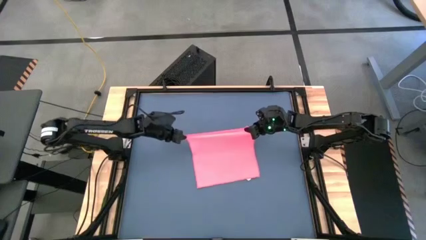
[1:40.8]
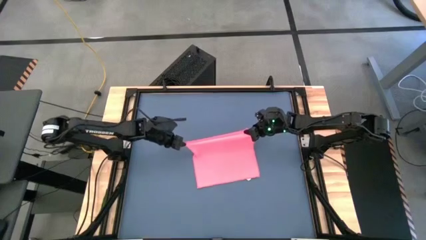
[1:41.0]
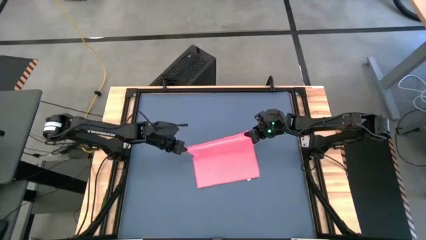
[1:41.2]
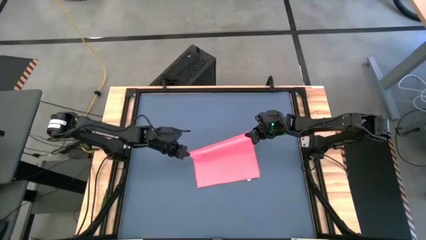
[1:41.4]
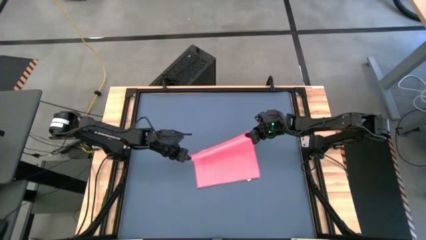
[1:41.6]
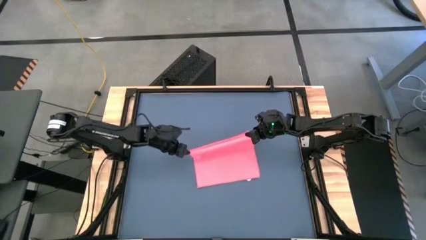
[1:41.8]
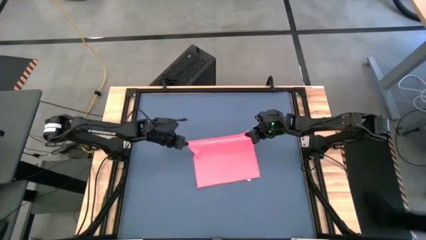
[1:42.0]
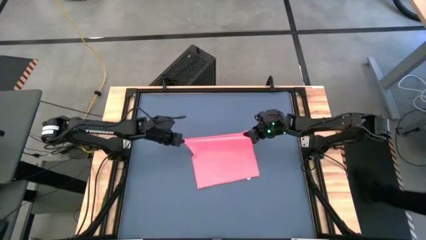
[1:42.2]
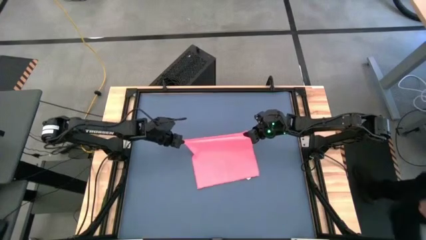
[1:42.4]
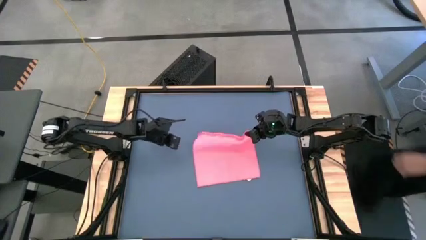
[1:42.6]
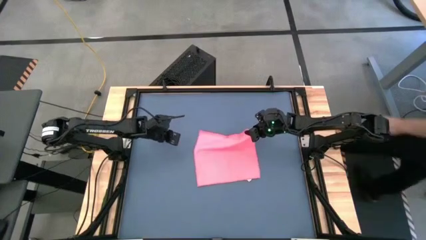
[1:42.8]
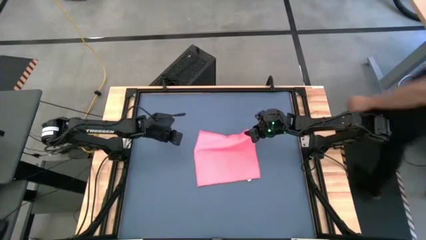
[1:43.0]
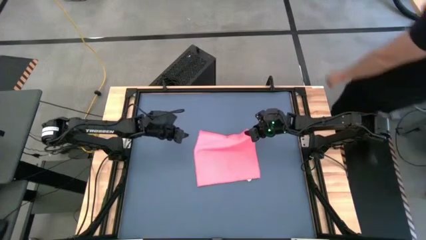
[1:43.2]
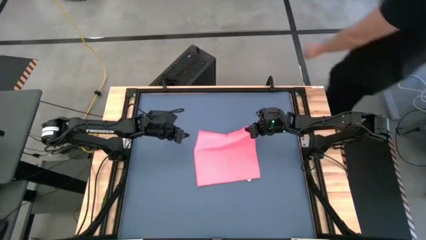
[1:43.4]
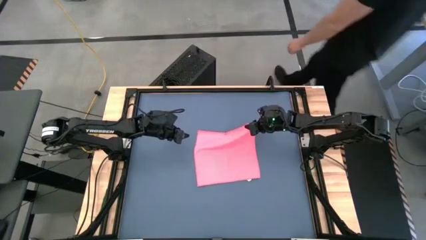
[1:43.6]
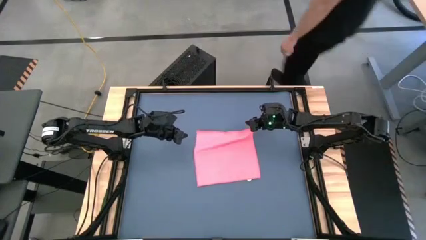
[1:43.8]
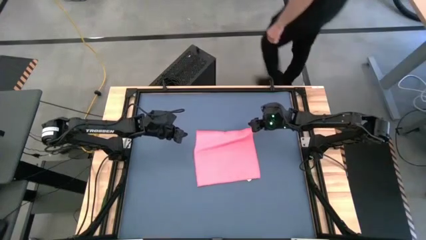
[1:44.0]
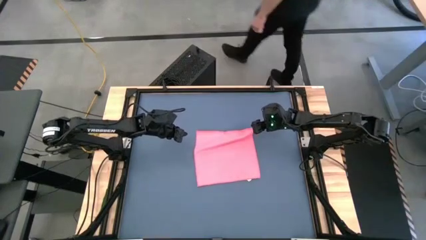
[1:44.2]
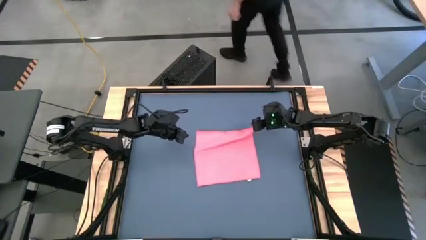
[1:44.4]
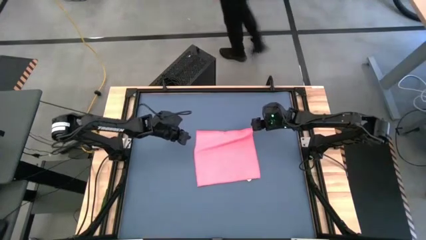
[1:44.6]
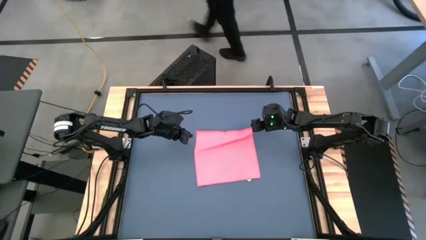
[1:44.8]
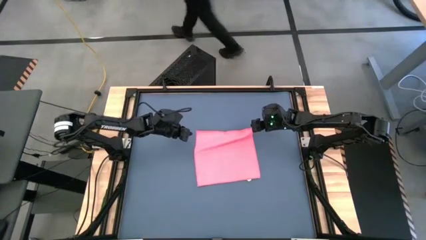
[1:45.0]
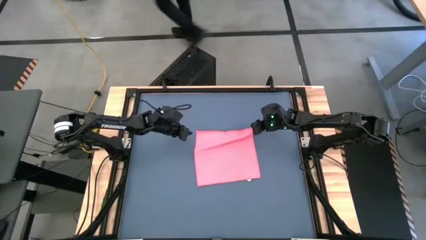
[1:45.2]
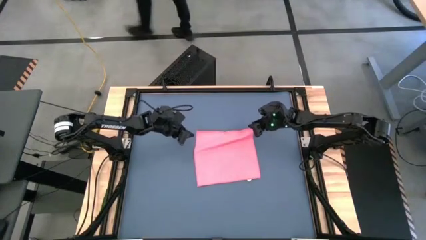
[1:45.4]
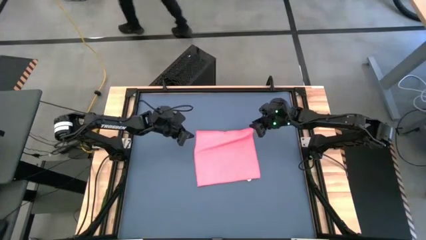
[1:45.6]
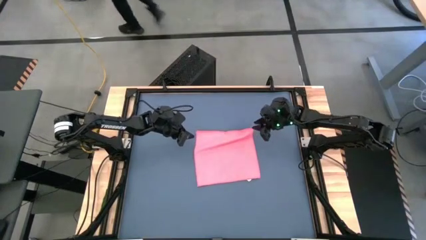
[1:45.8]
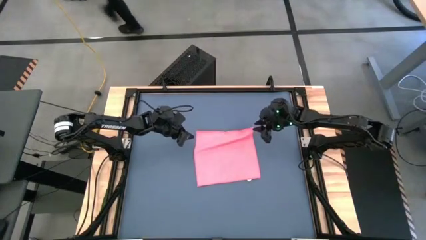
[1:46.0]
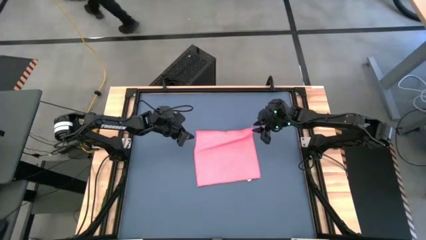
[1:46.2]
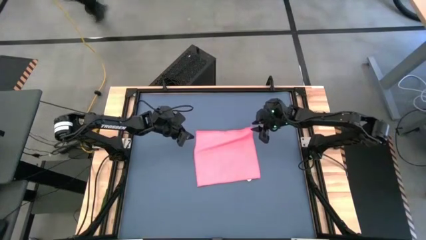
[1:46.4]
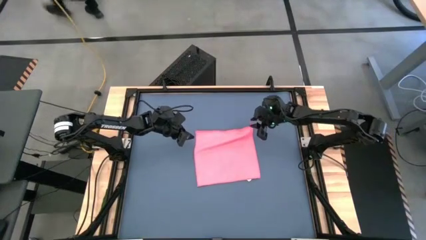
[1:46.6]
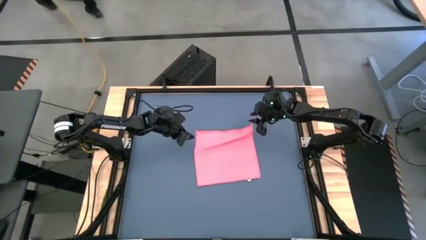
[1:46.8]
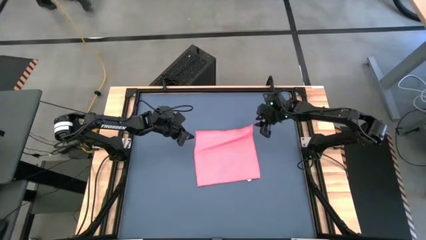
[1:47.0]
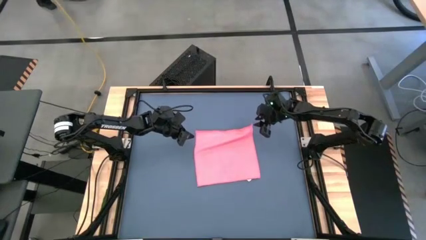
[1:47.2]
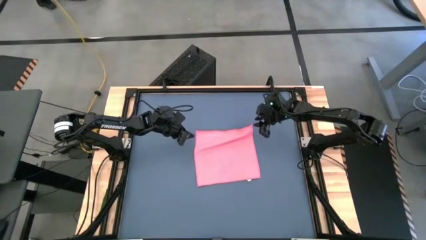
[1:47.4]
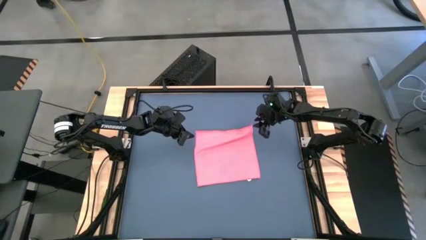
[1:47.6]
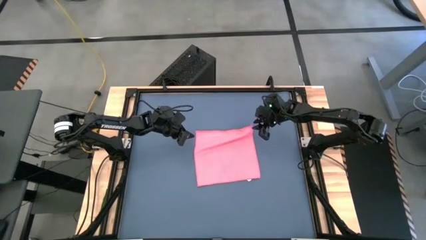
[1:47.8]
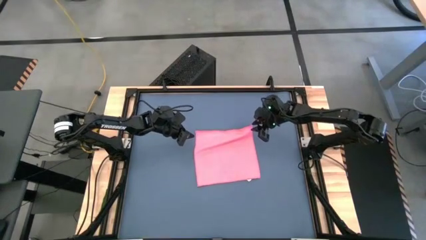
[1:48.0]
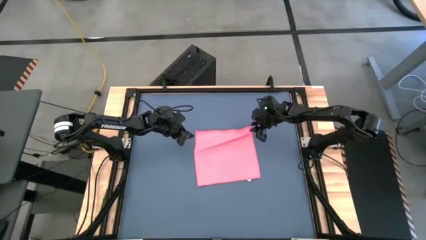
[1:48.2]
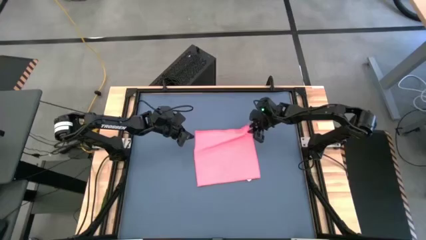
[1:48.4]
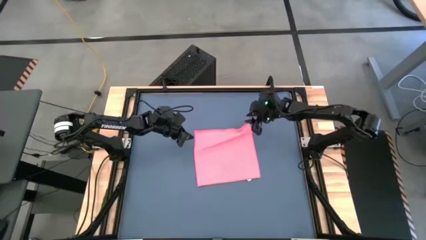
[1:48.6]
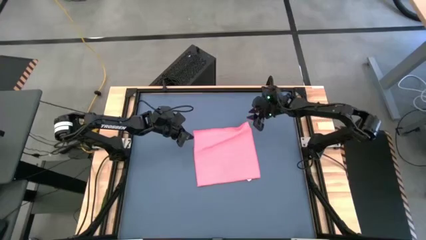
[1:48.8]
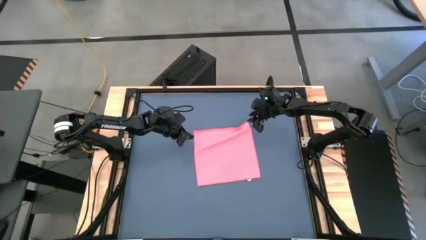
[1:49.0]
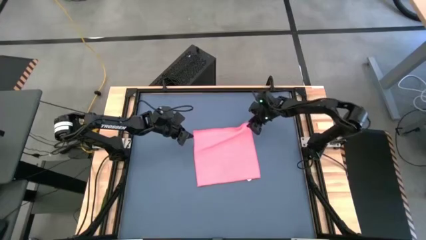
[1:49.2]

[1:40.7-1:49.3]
Task: Roll towel
Fold the pink towel

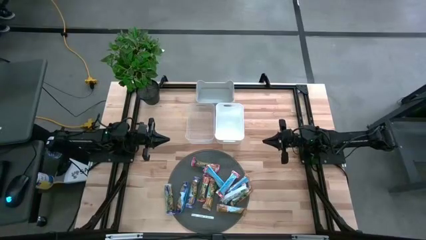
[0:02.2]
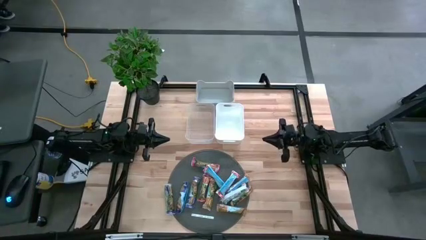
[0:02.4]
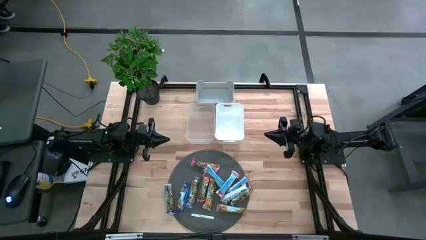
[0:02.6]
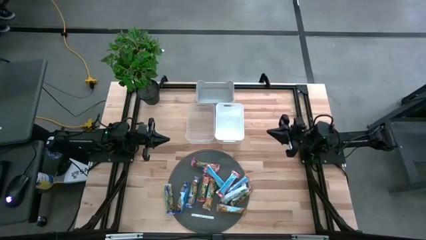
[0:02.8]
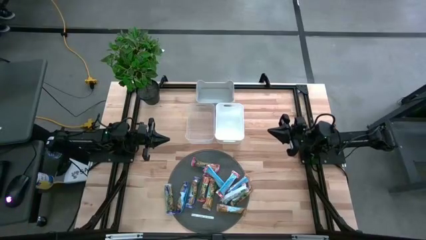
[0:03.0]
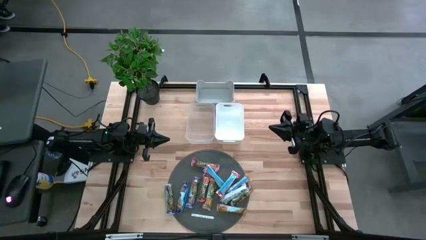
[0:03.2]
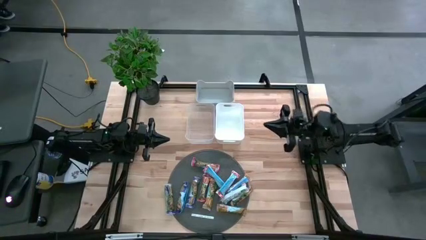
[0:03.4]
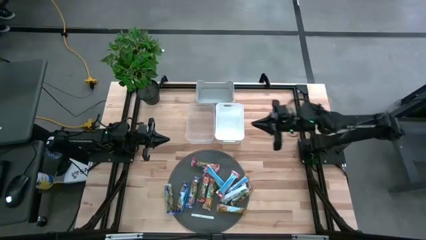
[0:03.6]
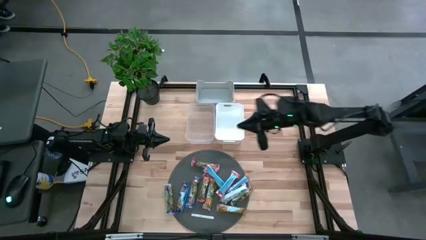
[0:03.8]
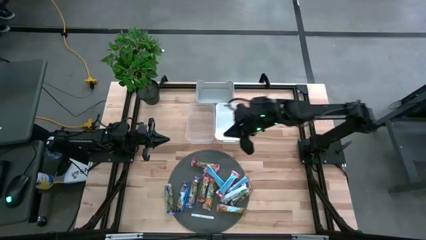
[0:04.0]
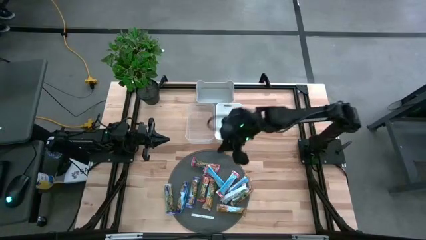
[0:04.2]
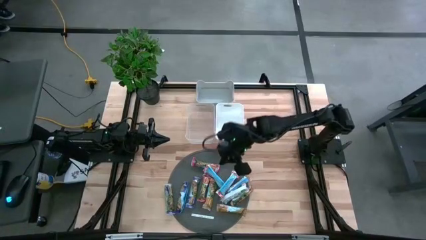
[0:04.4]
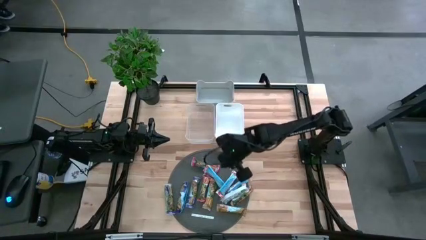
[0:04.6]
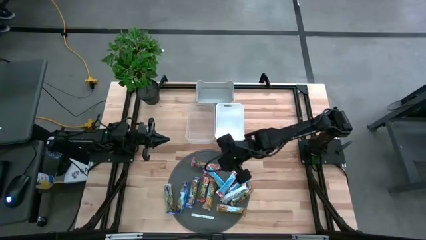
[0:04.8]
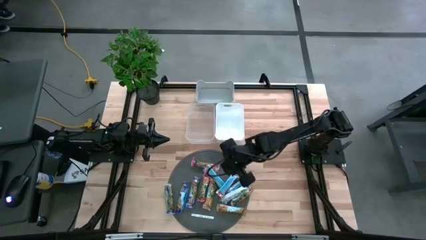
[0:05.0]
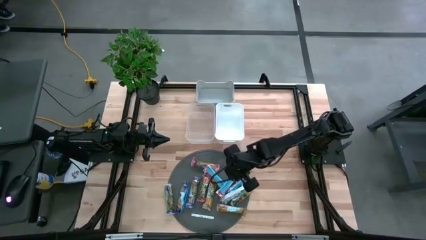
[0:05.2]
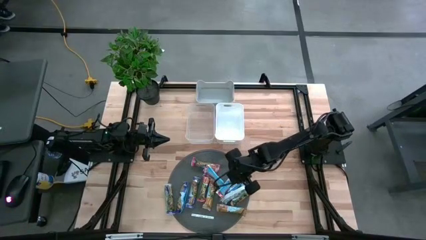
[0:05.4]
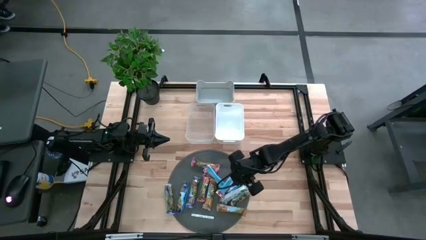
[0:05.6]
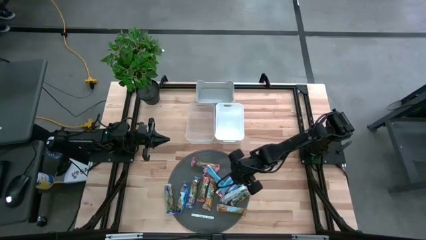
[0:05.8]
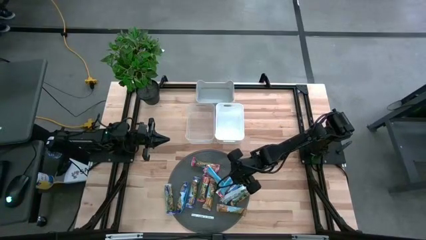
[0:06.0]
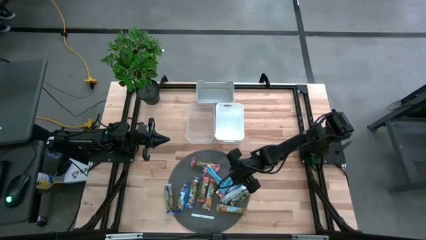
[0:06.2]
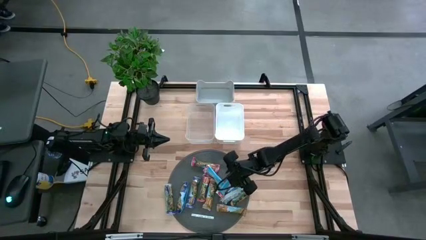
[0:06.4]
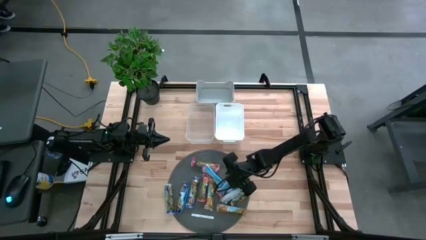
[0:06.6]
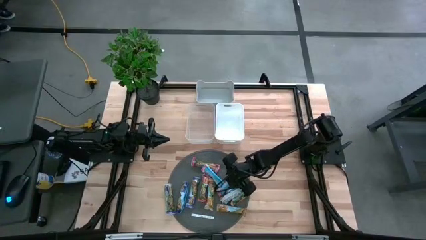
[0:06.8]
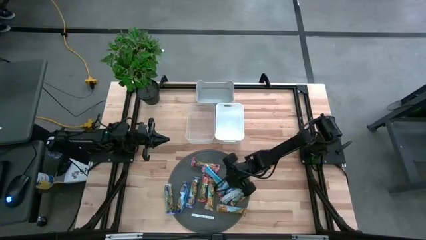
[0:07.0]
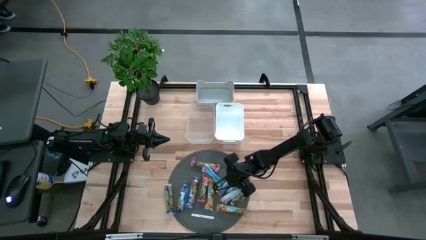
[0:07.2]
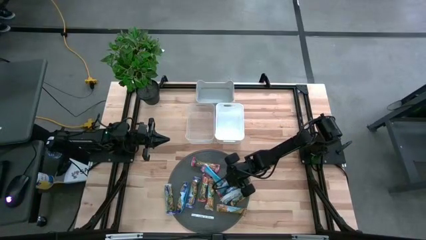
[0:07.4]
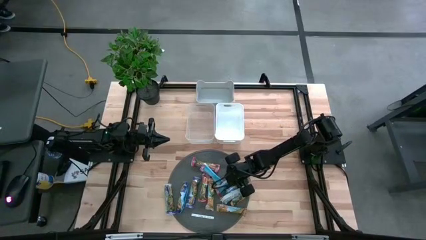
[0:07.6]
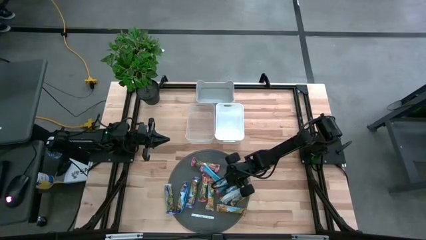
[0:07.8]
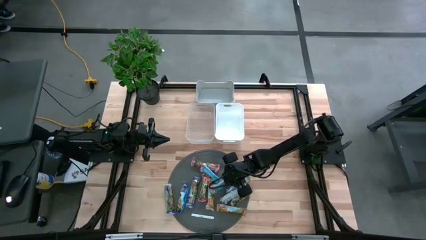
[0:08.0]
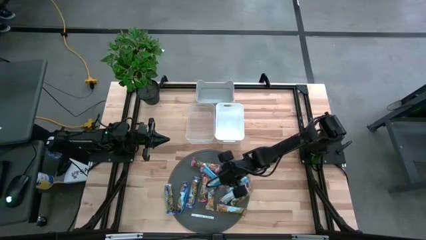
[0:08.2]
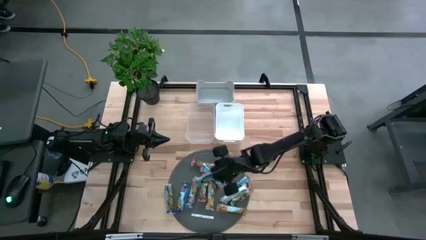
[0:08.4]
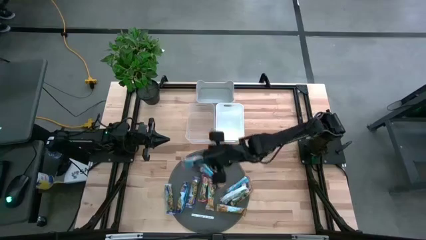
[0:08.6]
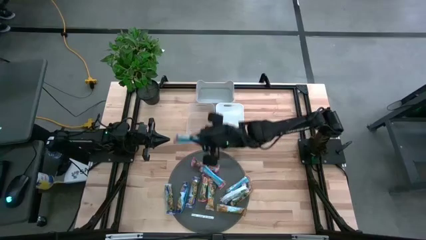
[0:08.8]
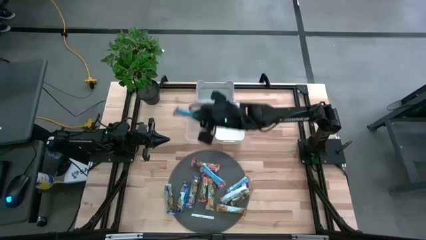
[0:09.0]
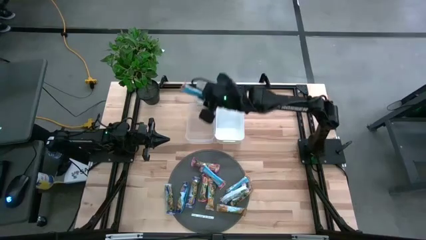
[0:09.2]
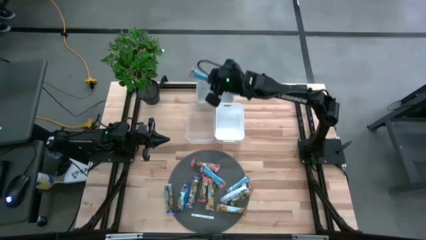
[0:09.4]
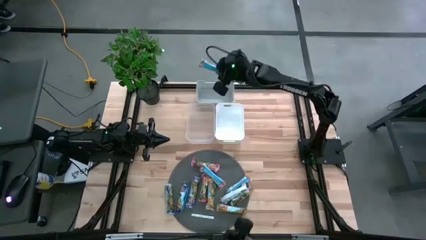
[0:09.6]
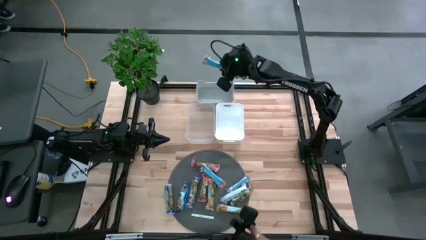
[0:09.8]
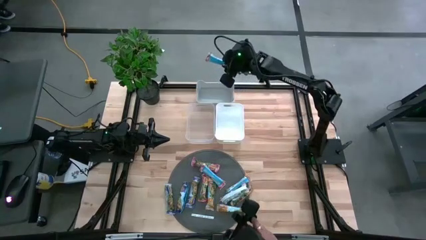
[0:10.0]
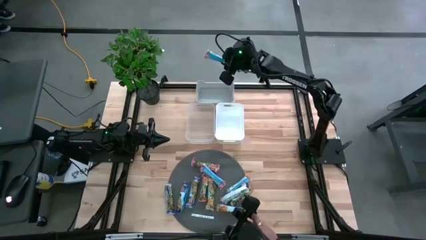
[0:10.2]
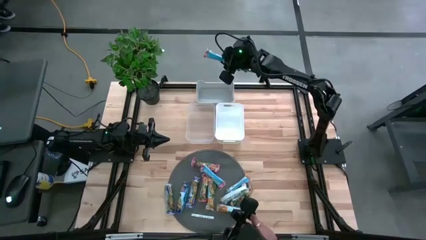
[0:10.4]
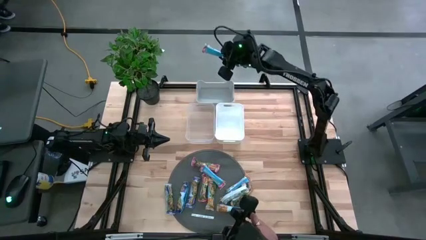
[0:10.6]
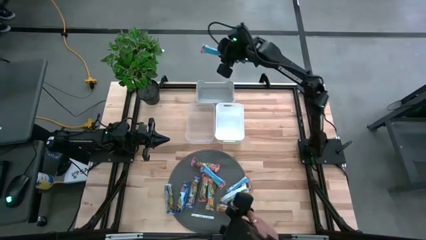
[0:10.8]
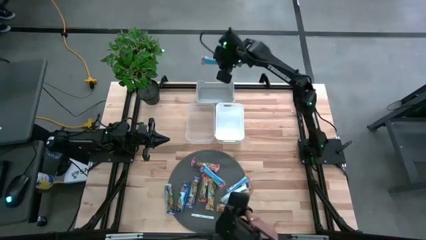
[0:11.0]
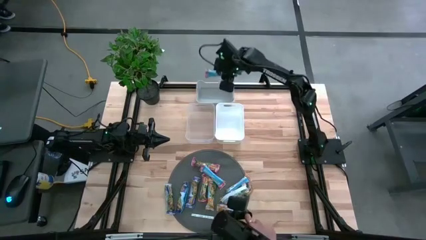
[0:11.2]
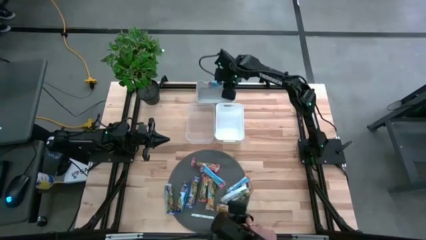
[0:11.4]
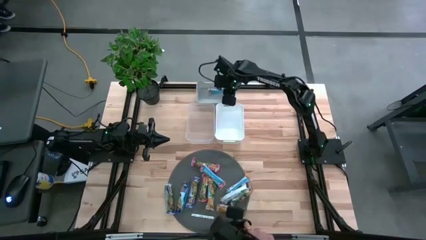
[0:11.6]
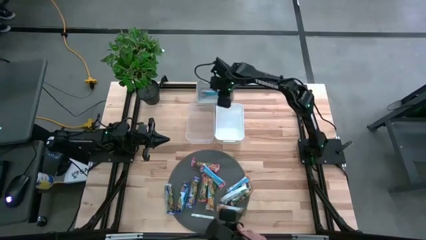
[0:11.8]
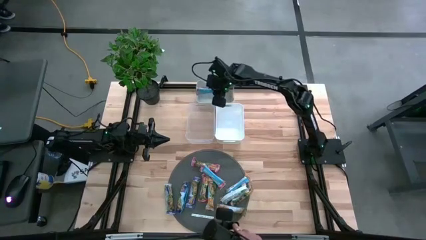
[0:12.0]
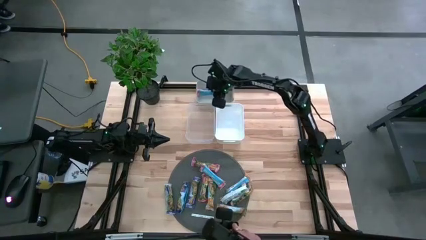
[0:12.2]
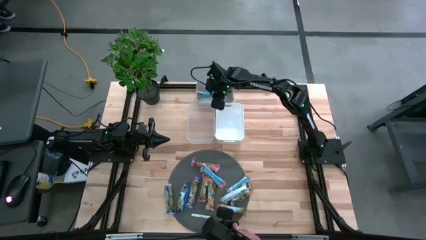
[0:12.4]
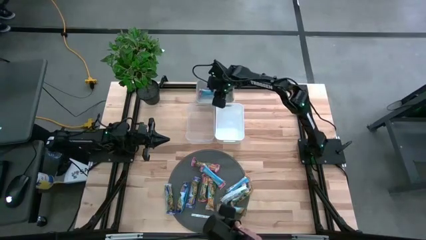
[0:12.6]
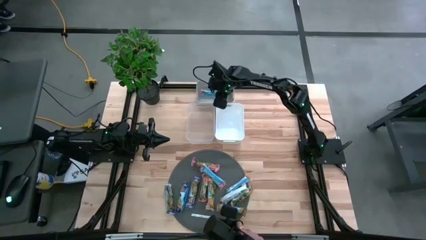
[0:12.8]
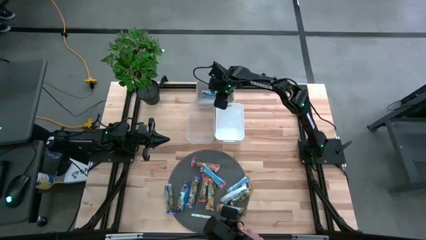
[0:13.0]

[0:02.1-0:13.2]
Task: Pick and place Granola Bars by type
Put the red granola bar into the gray bin
